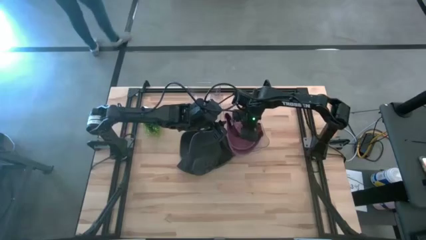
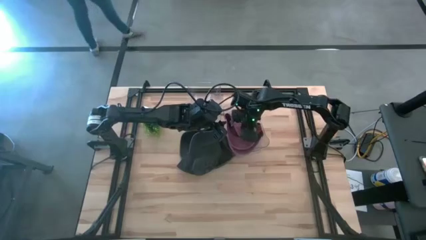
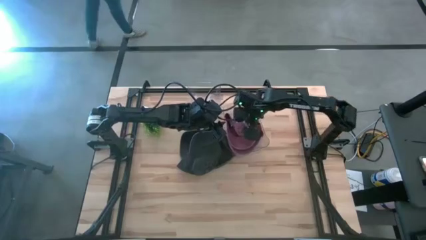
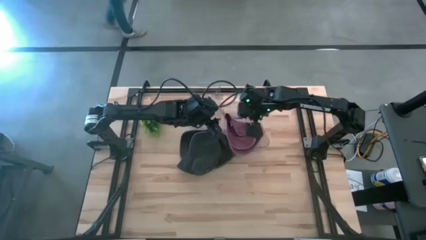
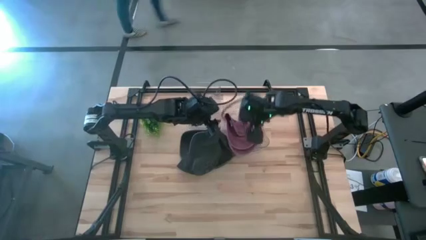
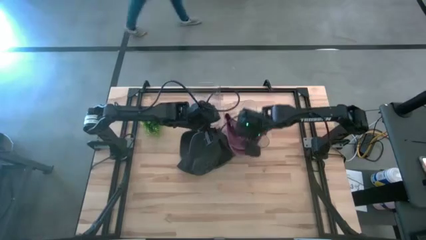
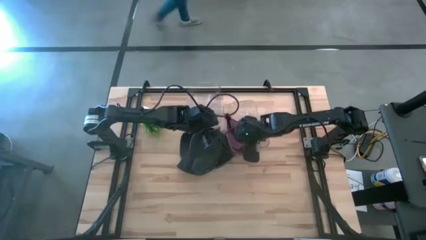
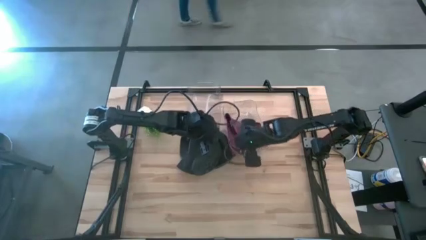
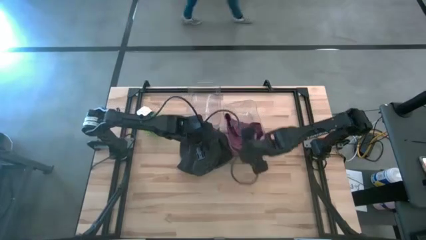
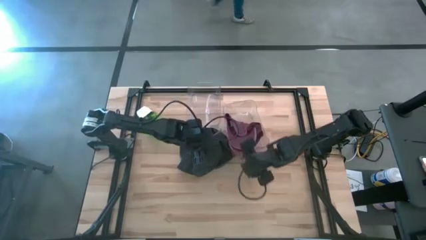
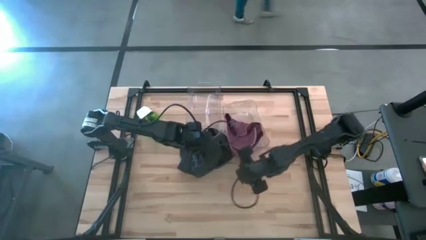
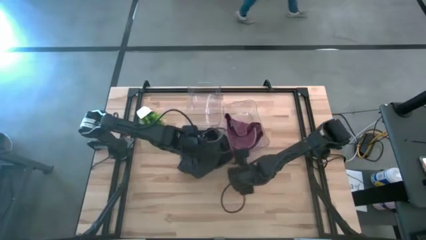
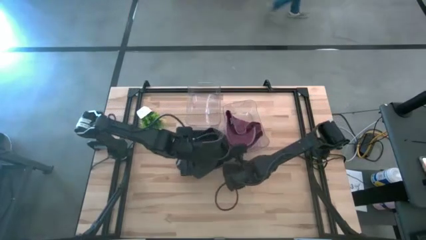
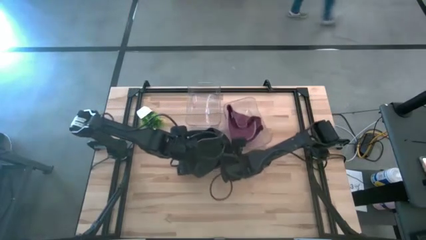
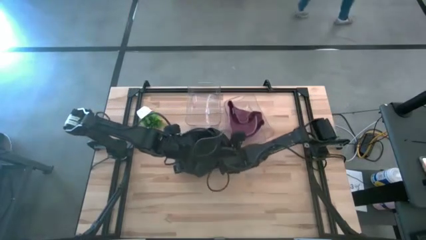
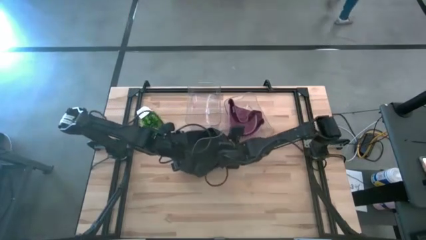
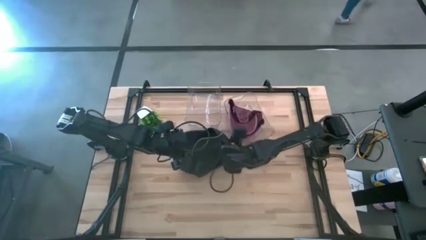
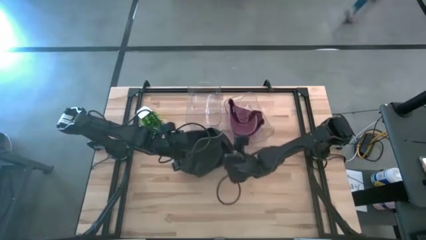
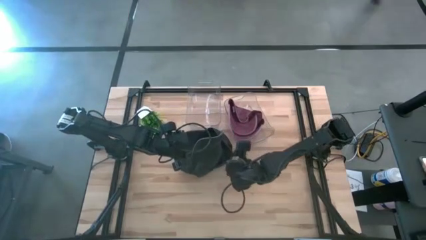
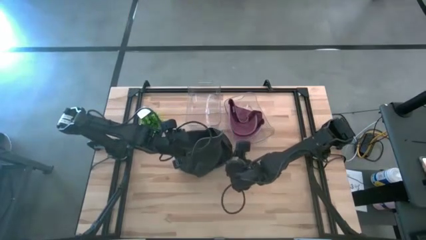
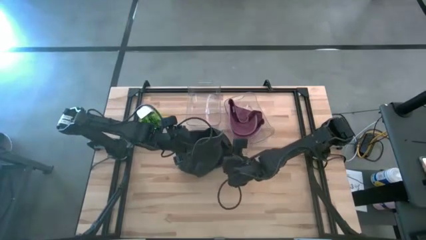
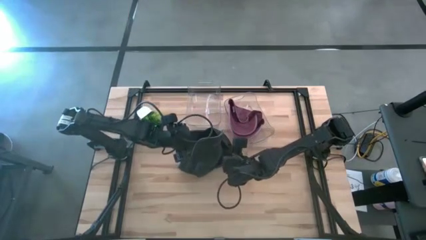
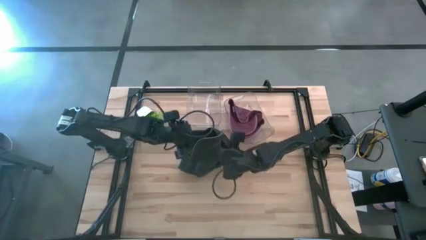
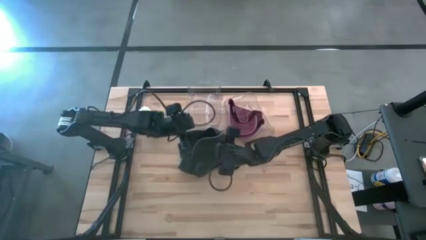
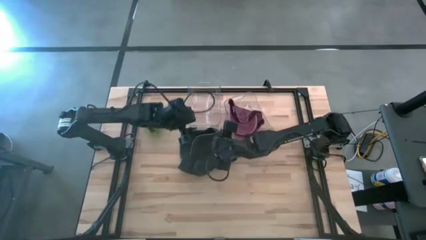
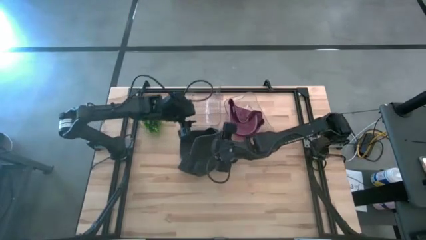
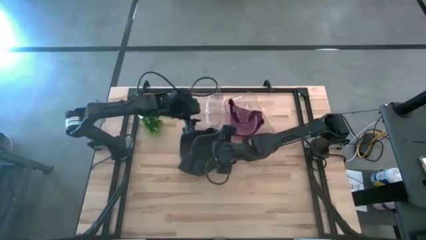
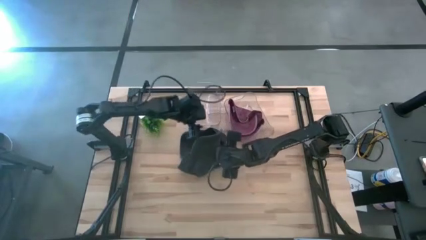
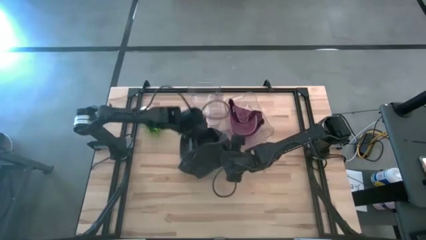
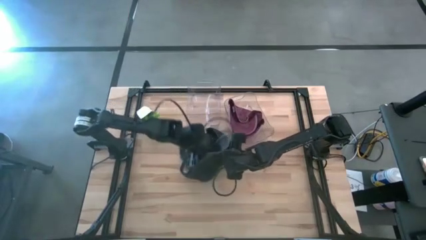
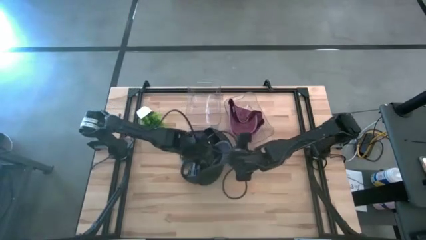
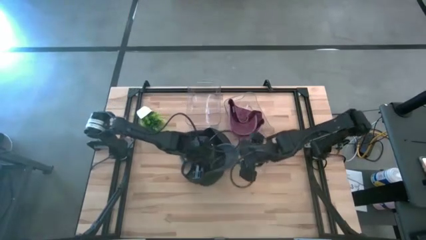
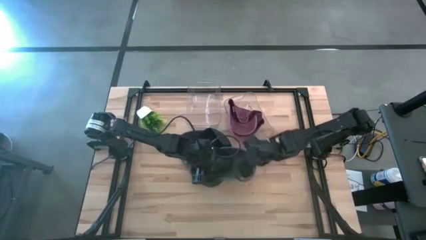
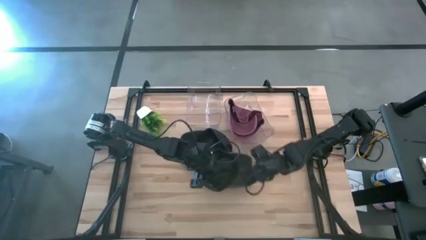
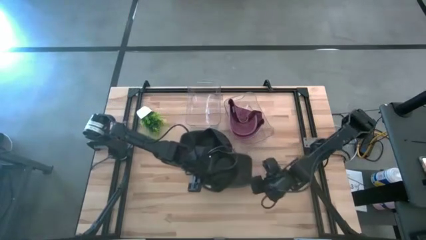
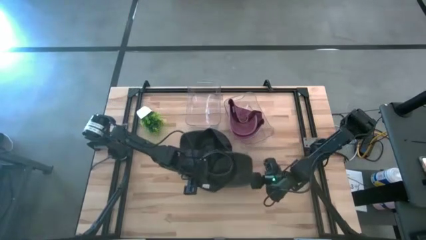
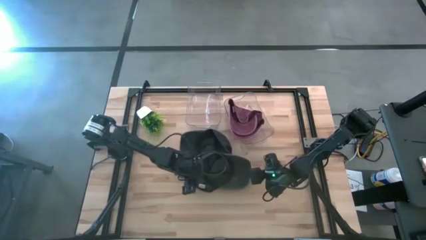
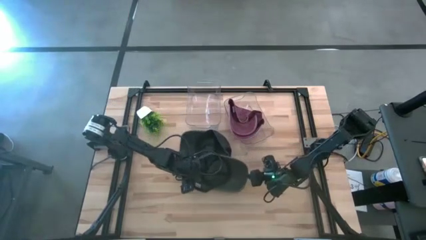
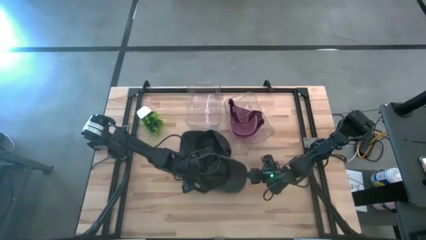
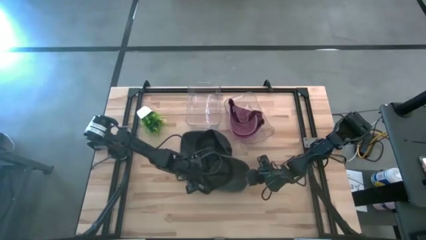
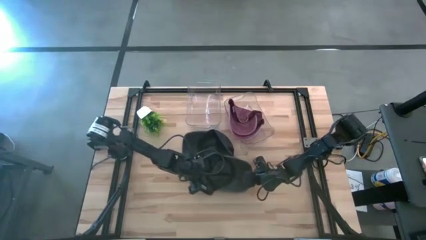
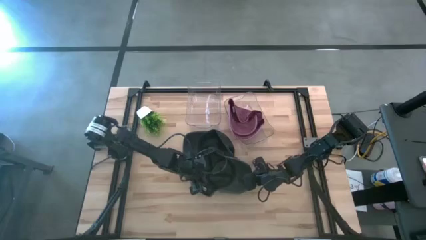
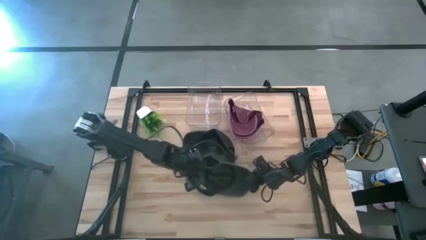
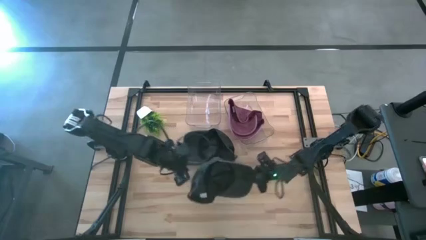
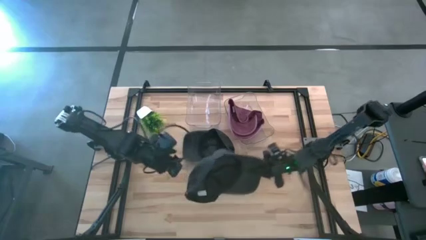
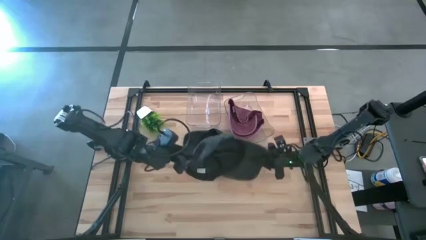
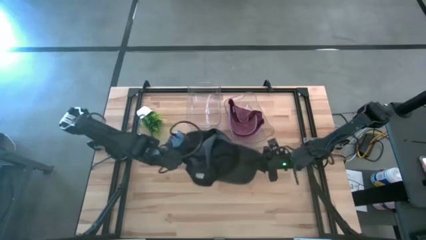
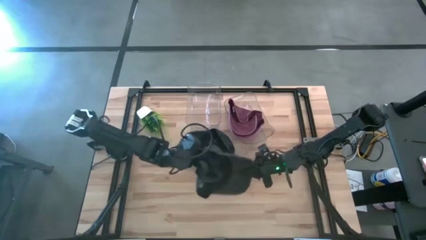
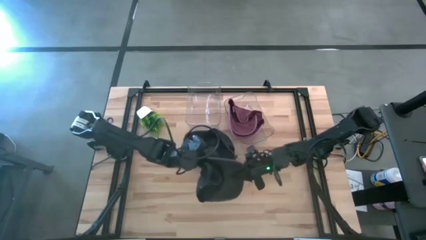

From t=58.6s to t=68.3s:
Task: Pick & Place hat
Put the bottom black cap into the left transparent bin

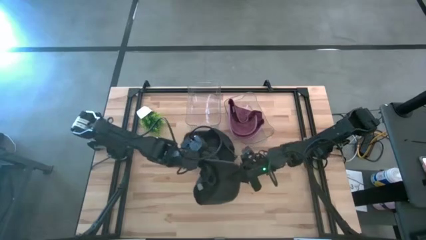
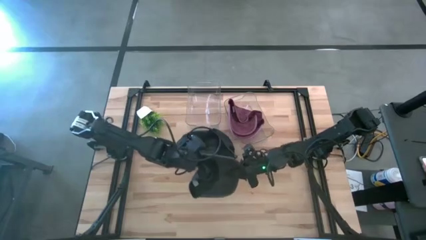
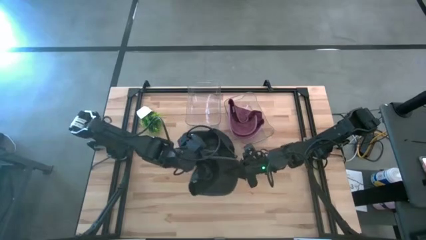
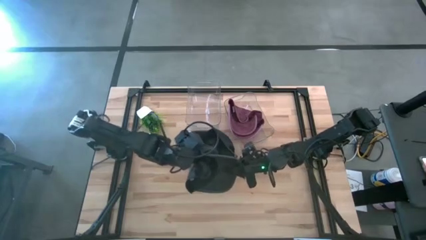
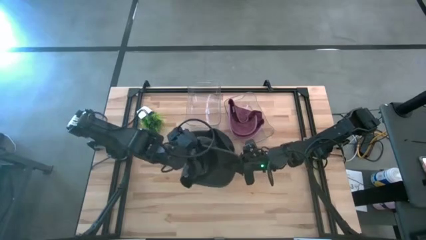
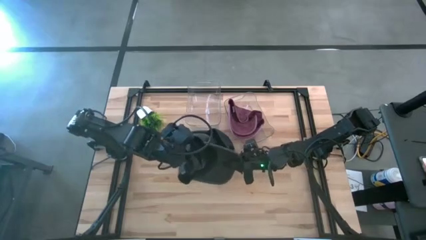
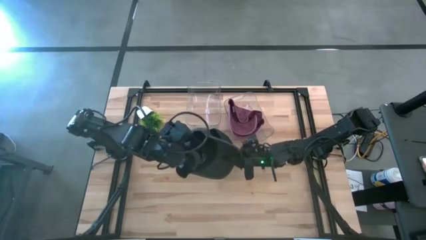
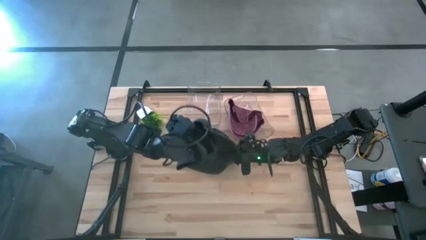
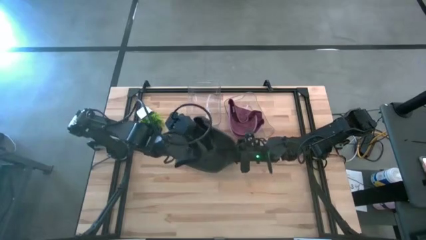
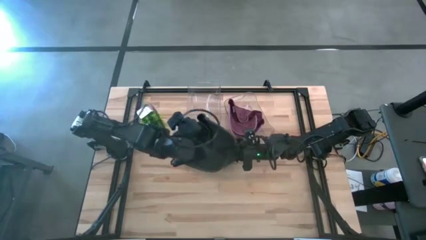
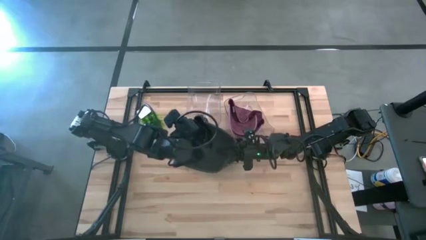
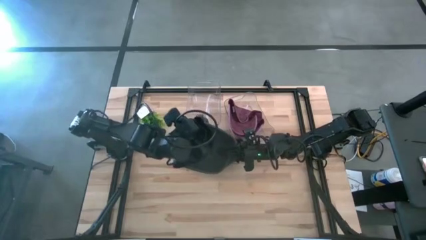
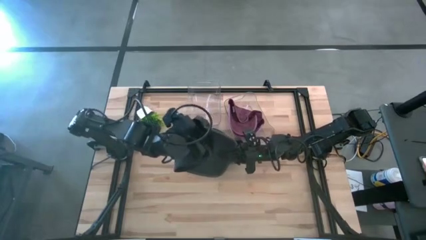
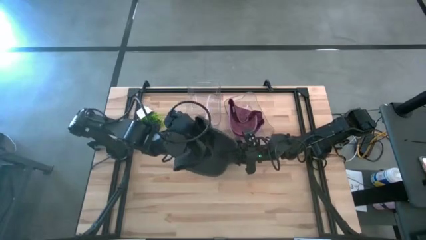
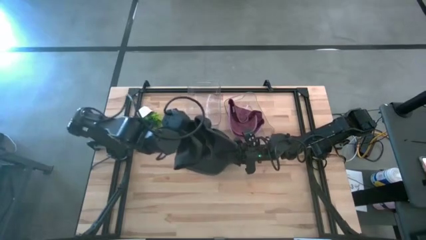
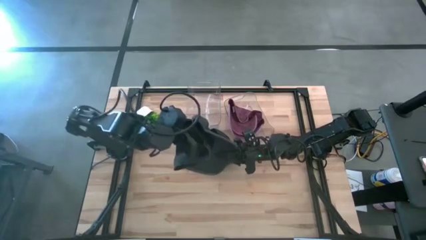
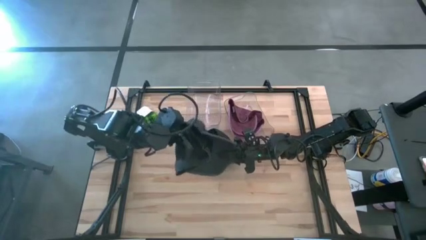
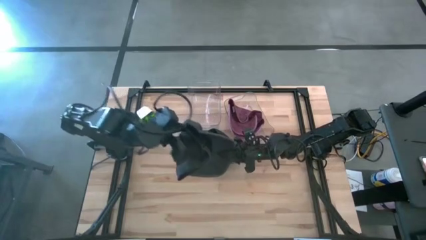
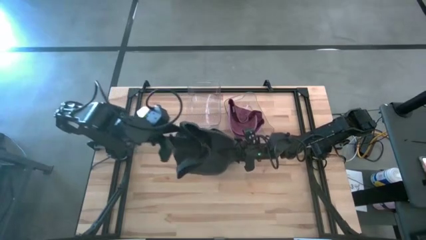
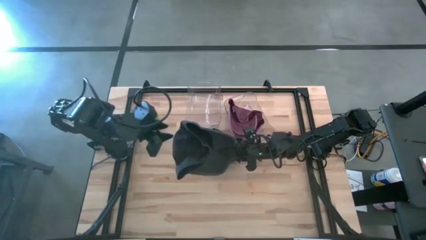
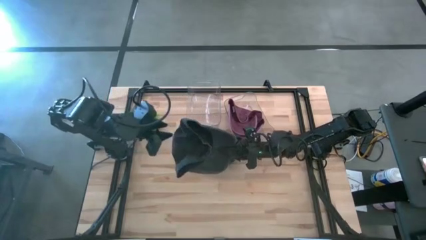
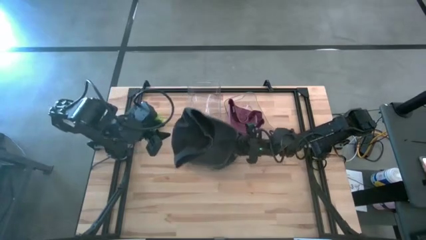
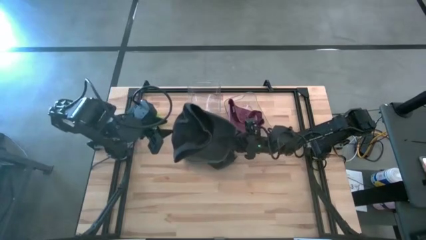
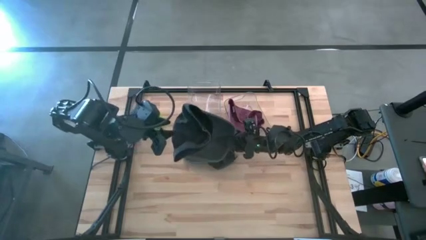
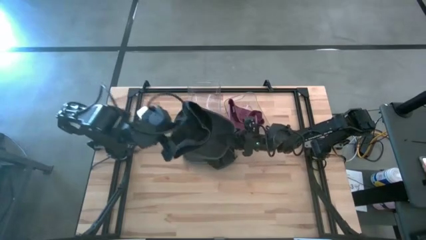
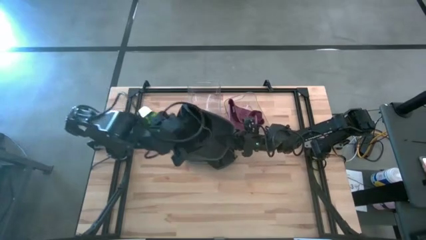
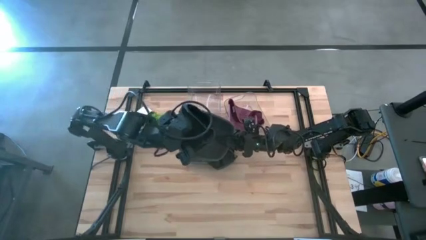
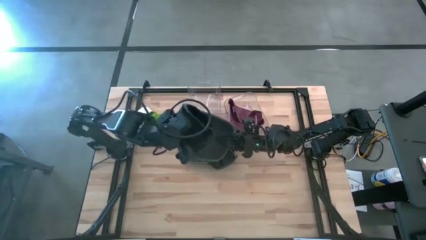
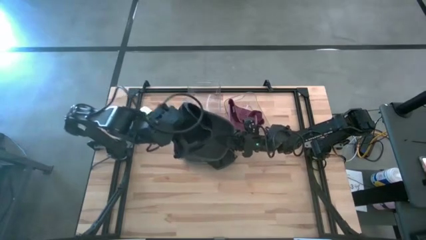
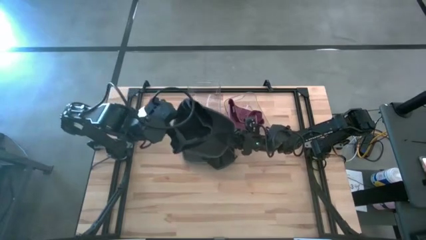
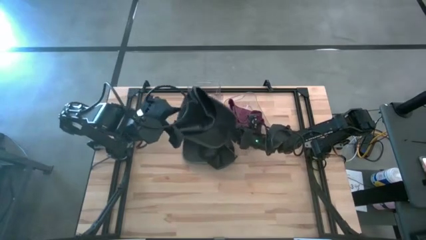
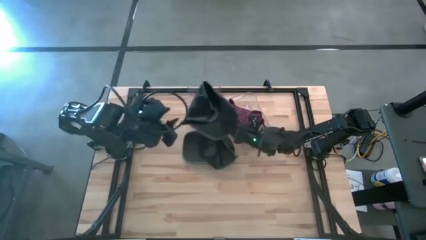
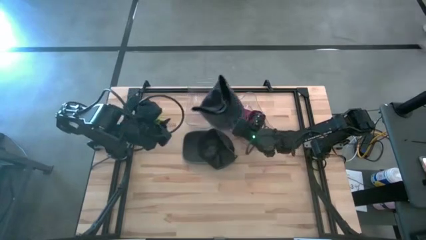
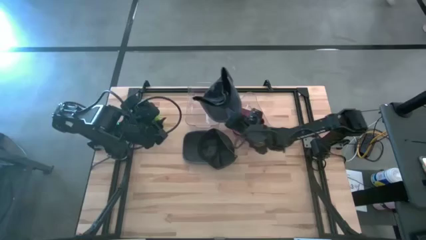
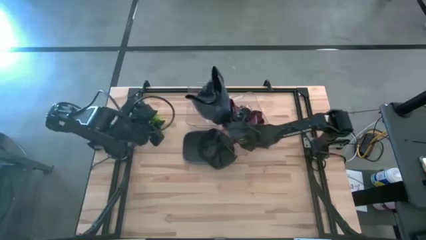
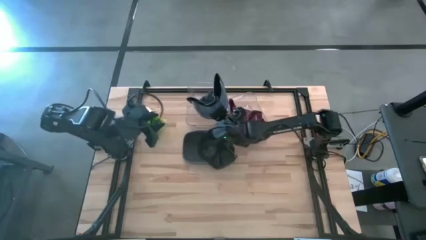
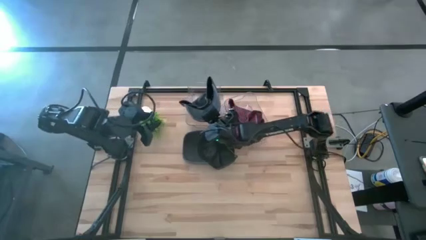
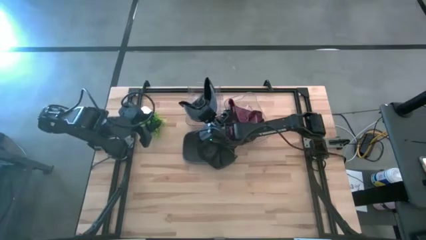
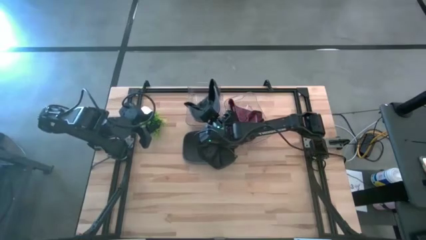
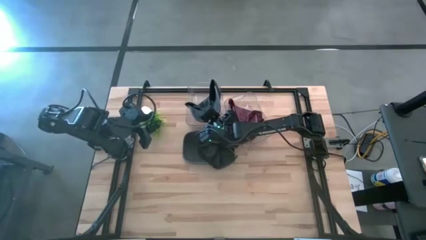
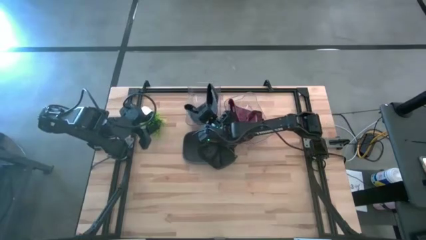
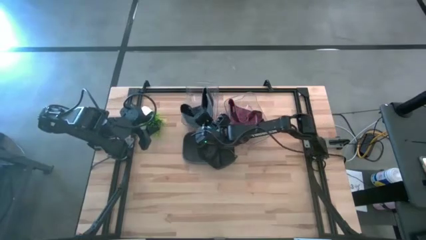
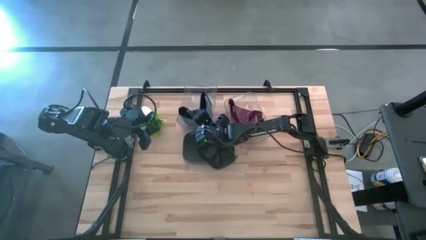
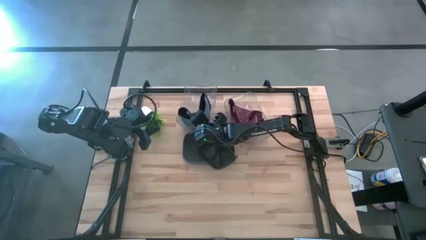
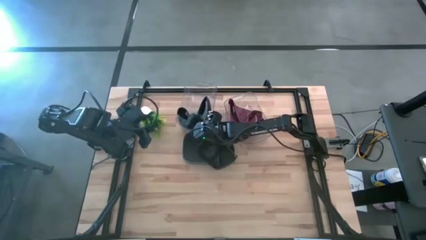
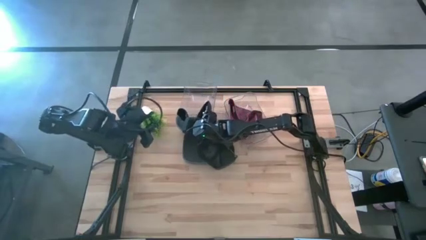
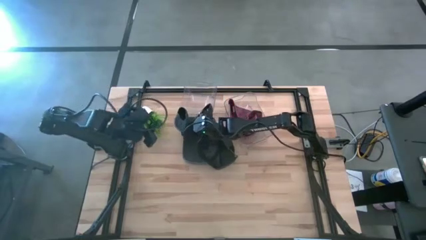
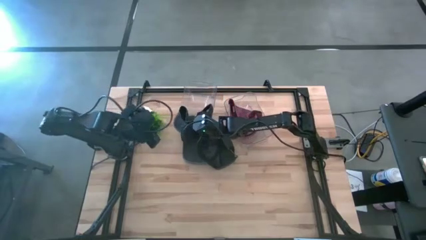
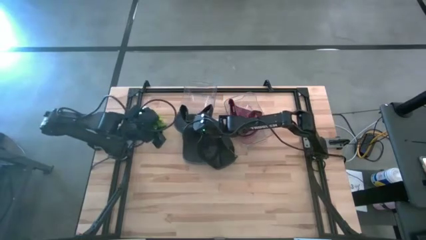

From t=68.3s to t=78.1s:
Put the bottom black cap into the left transparent bin
